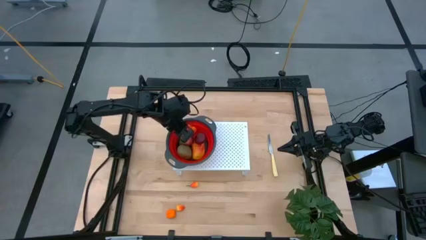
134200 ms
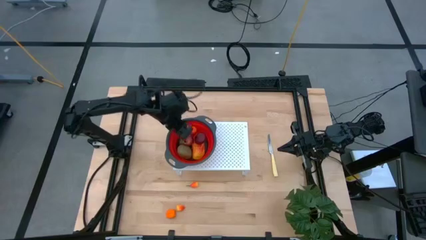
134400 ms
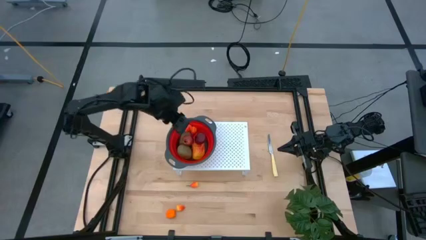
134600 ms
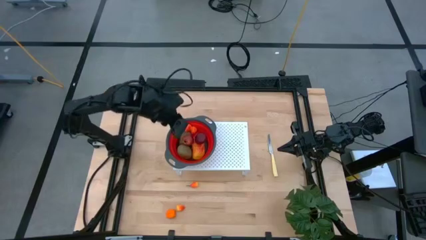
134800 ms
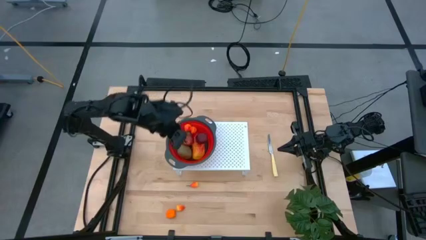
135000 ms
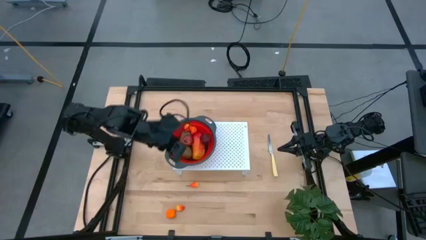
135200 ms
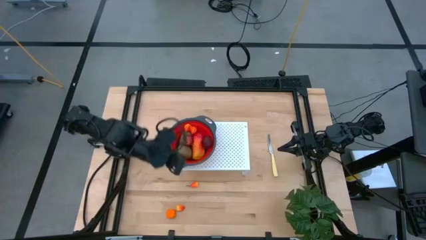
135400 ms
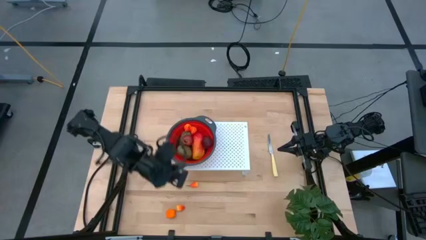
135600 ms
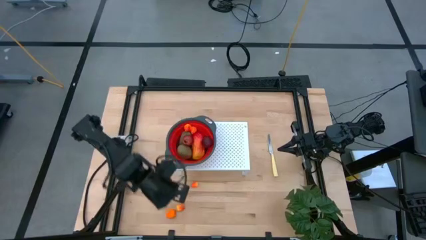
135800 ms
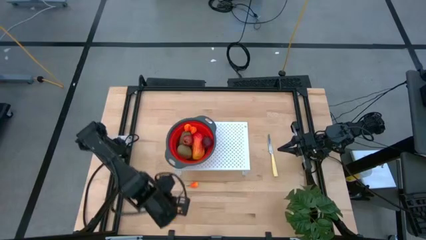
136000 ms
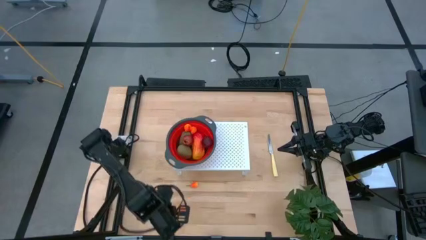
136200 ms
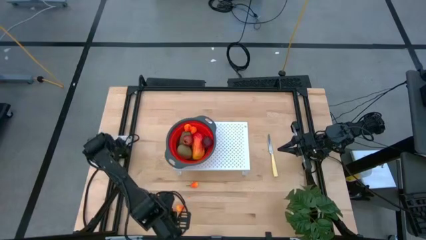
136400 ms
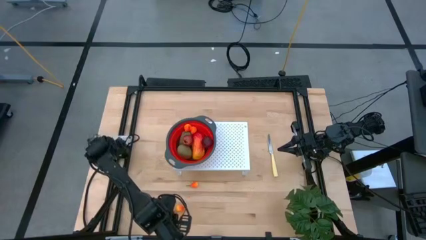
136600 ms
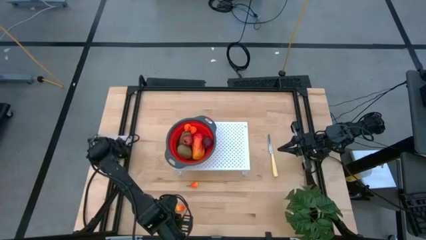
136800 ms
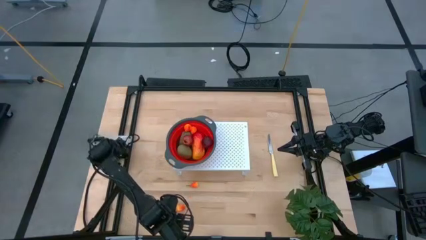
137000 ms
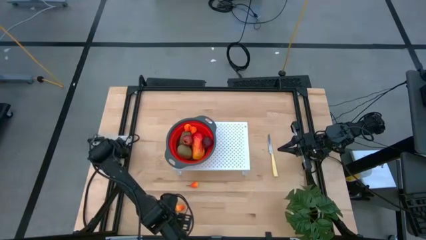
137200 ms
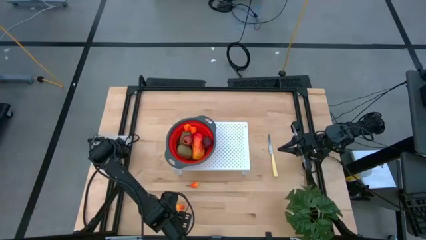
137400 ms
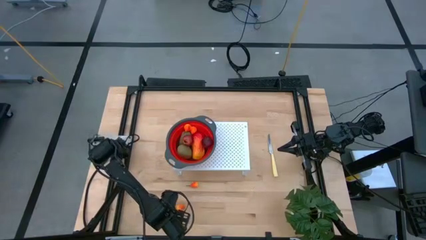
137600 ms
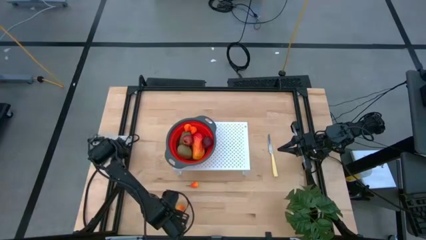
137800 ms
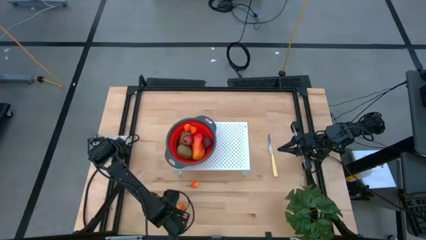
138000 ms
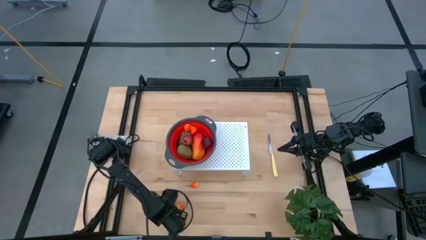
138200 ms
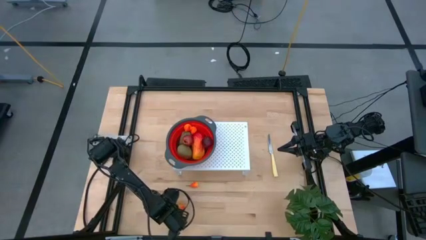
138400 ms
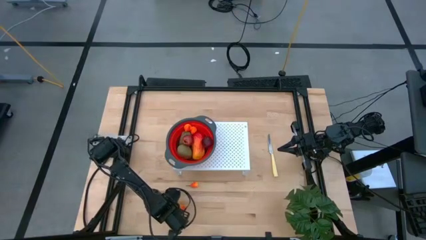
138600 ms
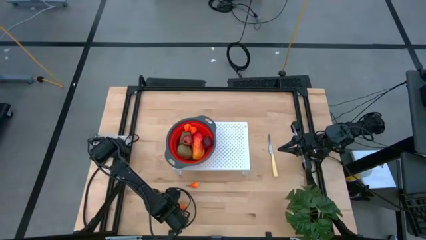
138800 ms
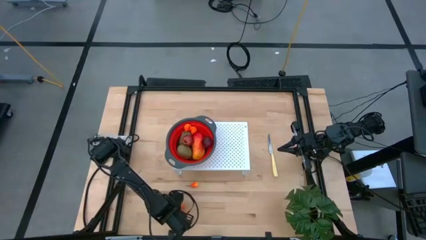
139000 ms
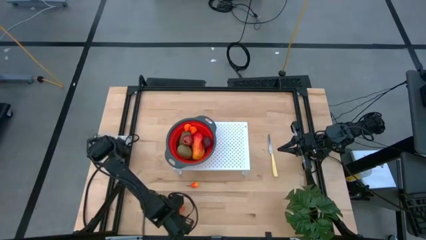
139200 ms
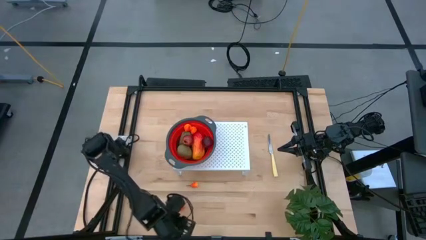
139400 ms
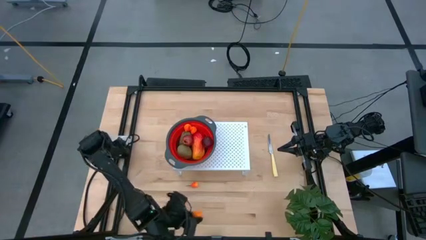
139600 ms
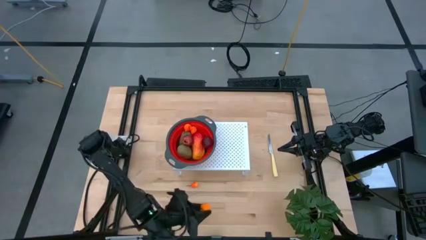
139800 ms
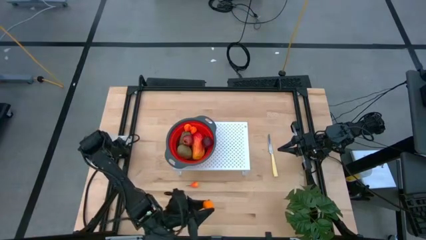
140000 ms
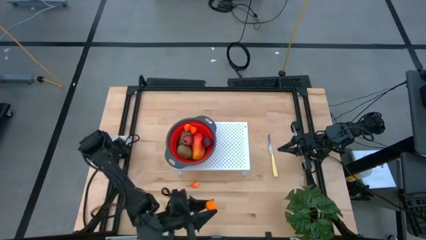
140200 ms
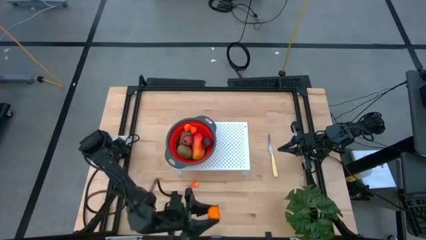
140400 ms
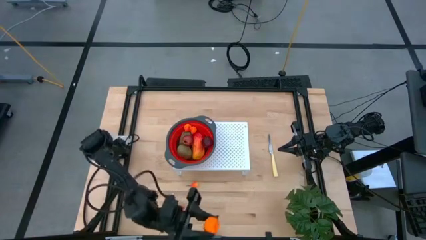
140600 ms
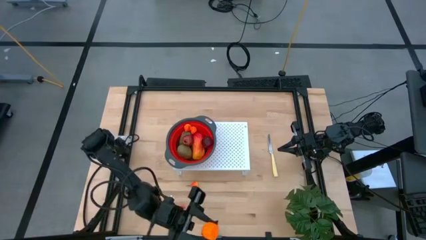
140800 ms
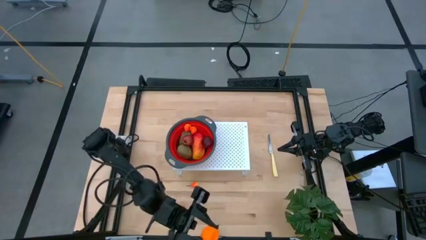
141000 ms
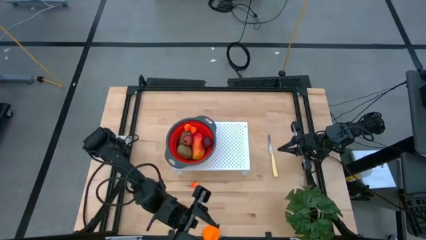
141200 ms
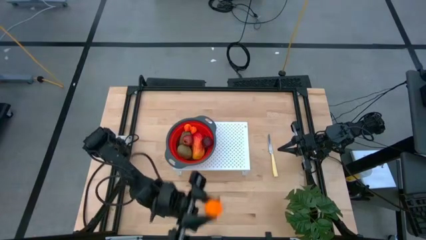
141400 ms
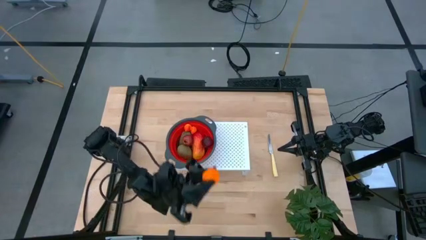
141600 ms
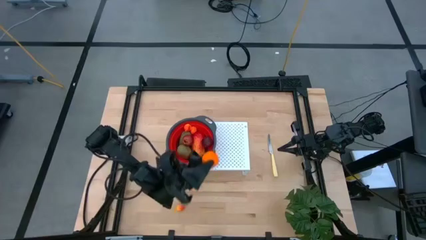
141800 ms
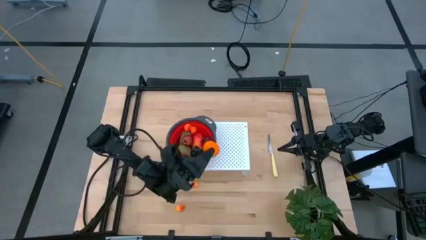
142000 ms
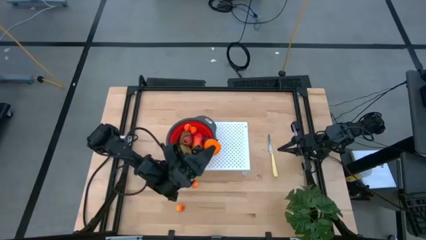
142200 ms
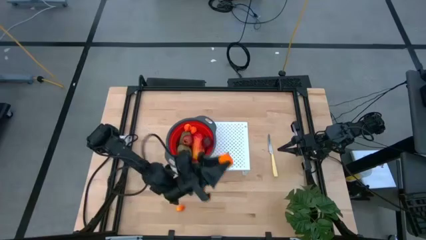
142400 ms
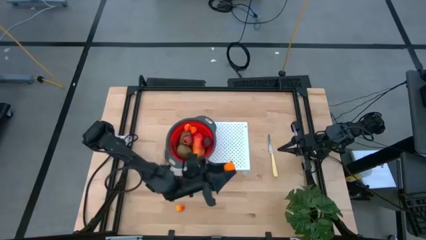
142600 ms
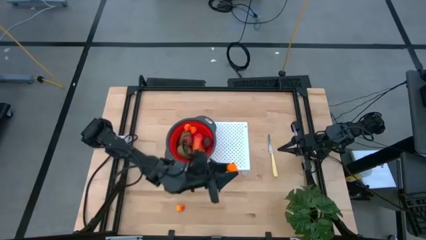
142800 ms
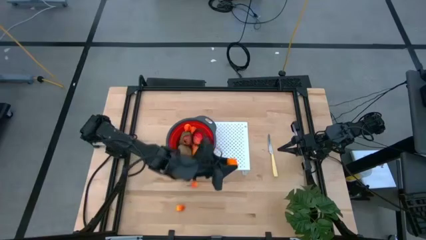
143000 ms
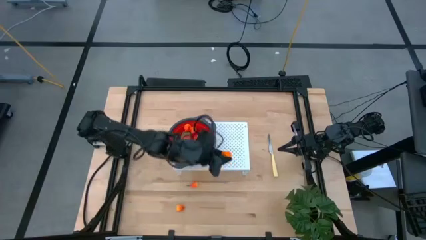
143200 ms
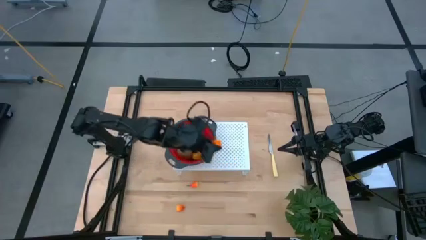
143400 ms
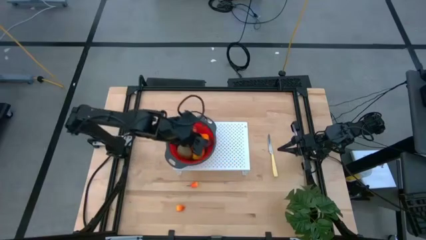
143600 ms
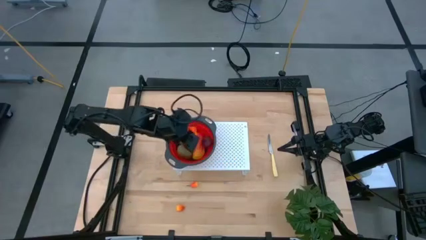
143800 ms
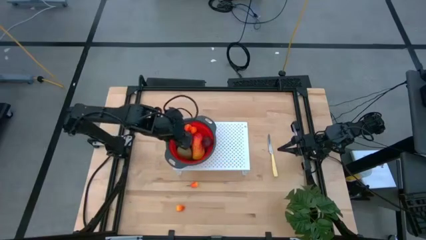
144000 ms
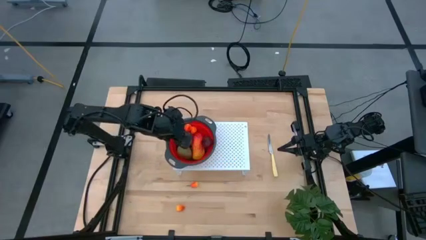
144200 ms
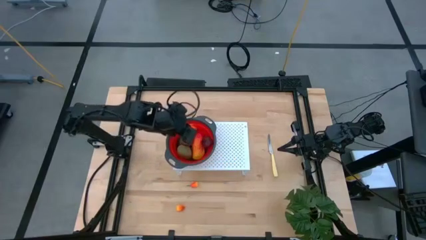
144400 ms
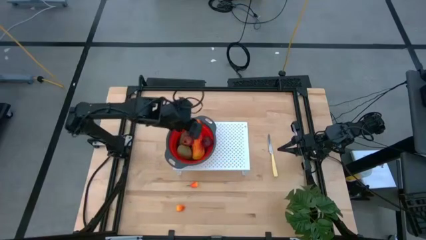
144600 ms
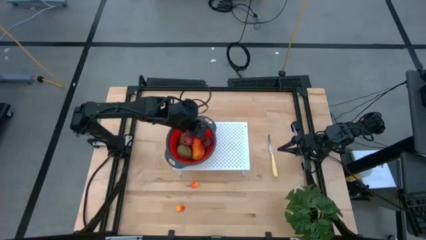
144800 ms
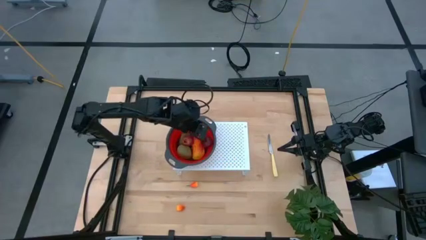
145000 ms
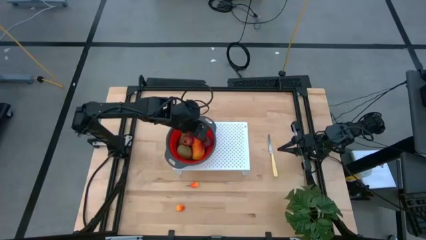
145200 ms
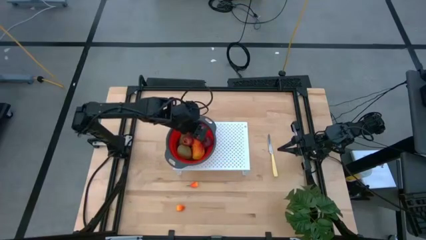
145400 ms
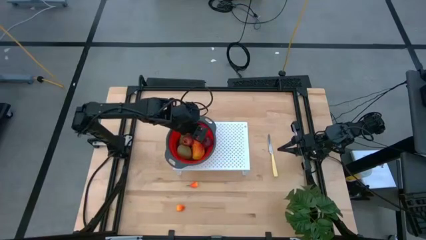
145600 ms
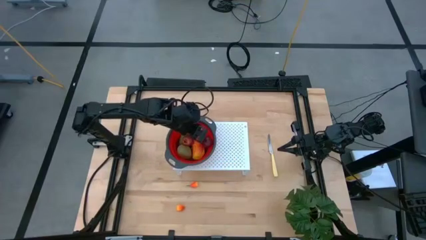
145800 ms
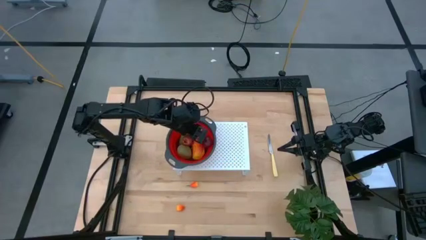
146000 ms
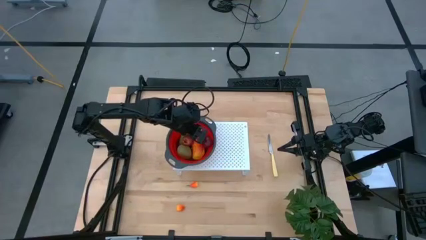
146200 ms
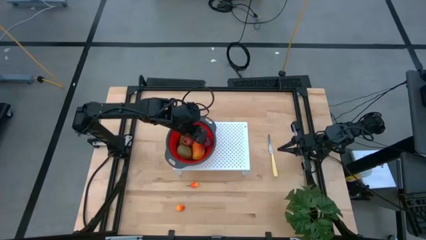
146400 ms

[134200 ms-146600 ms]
Task: Pick & Place Fruit
Put the orange into the red strainer bowl on the shelf
